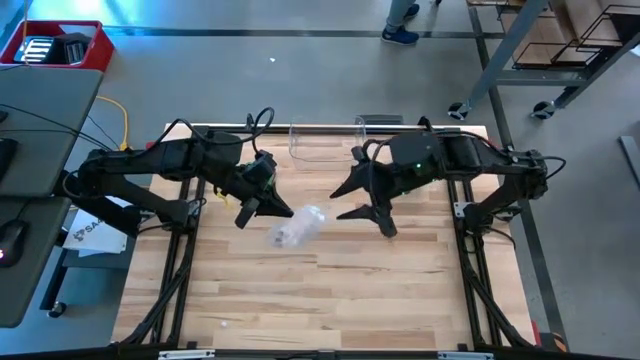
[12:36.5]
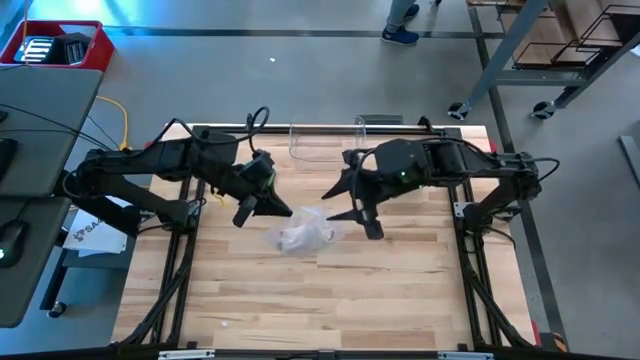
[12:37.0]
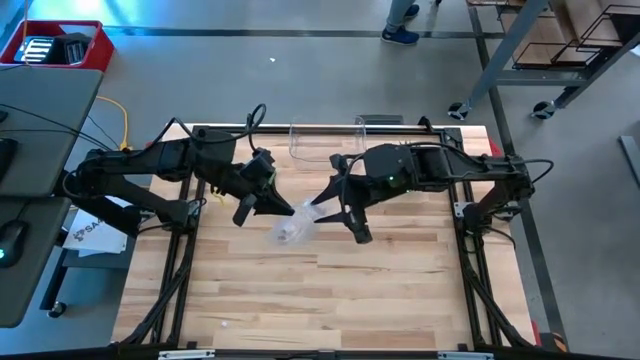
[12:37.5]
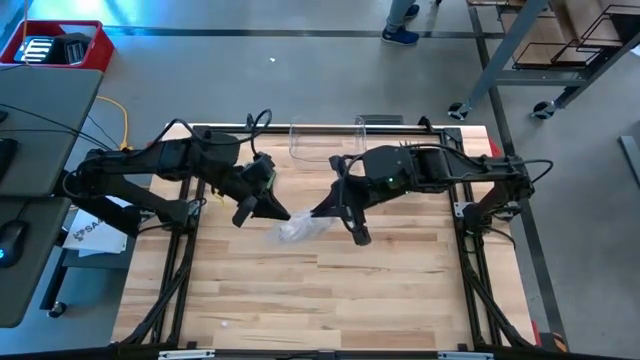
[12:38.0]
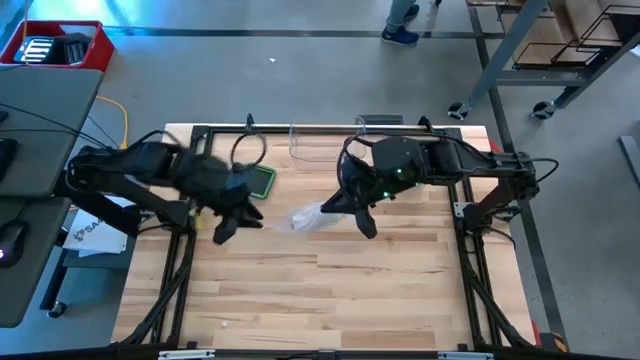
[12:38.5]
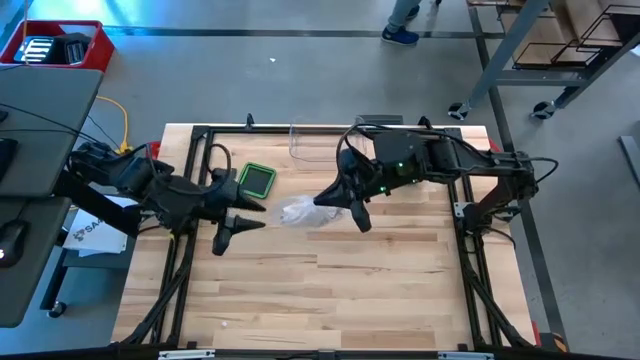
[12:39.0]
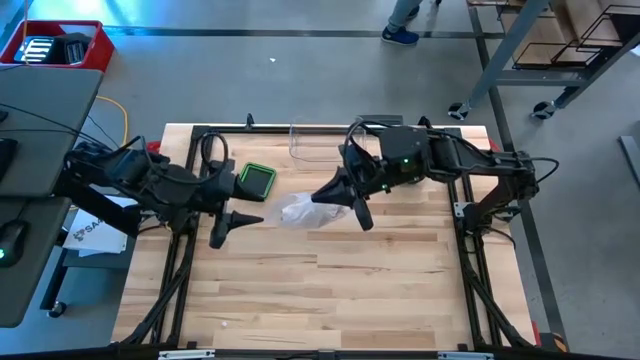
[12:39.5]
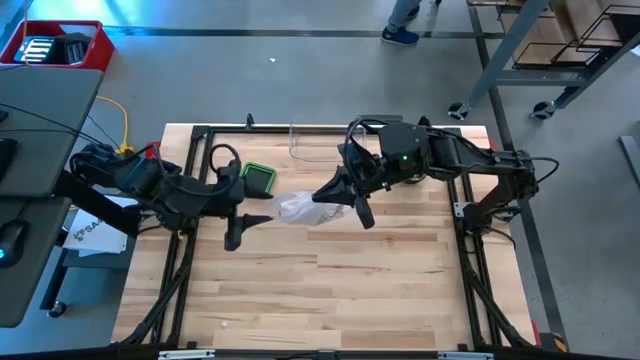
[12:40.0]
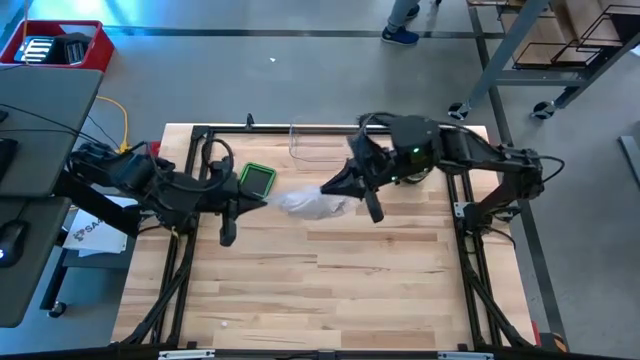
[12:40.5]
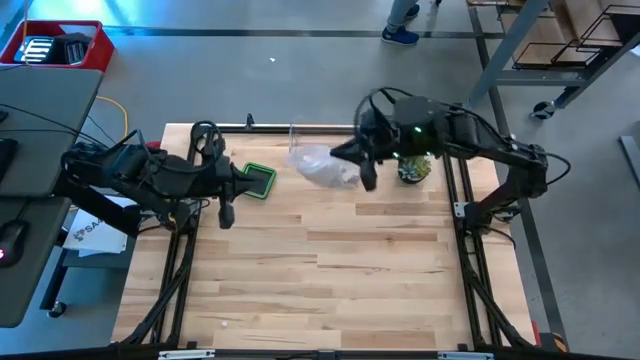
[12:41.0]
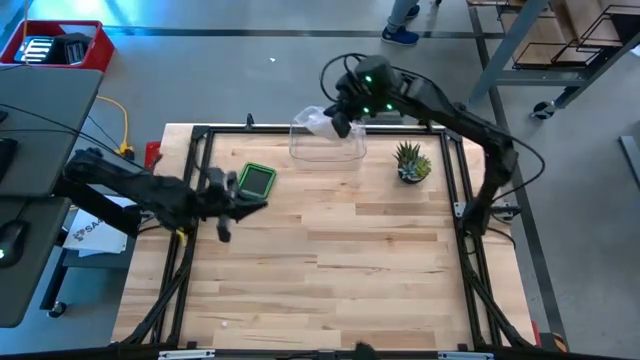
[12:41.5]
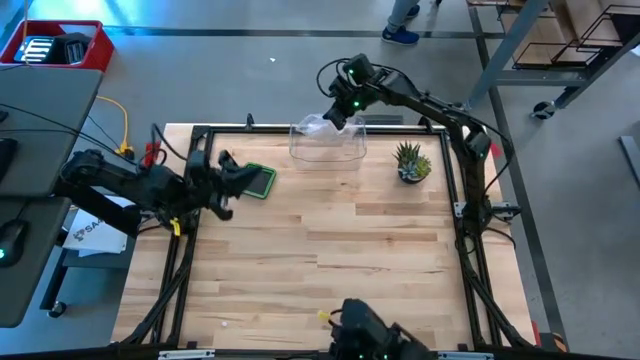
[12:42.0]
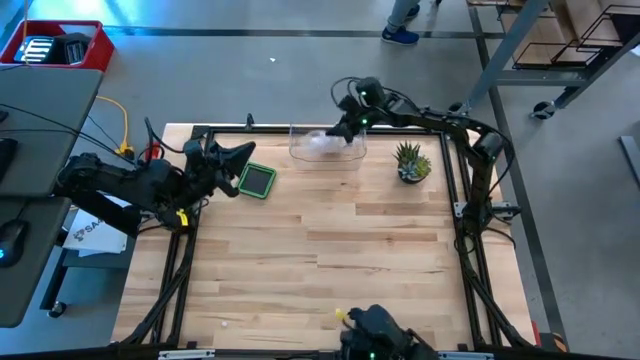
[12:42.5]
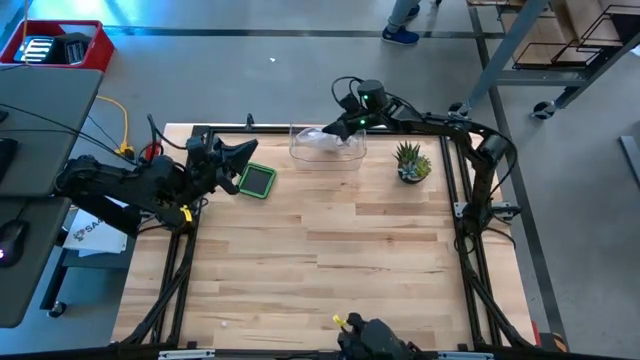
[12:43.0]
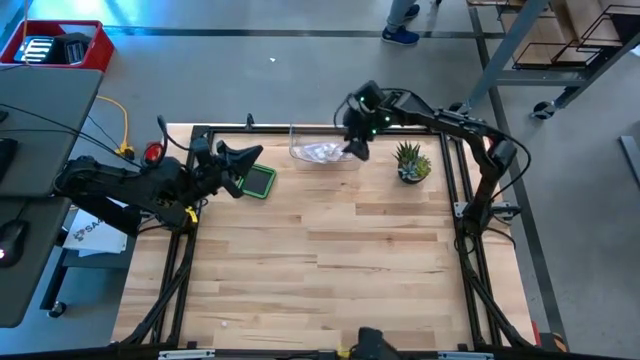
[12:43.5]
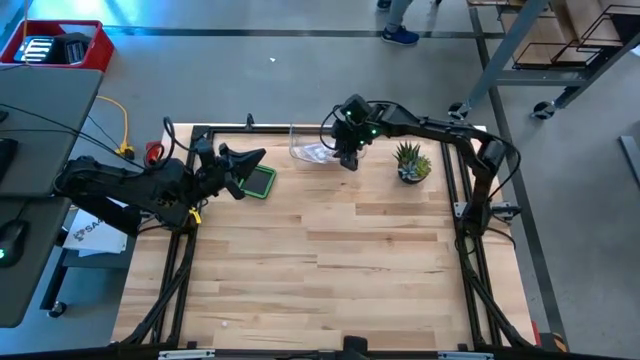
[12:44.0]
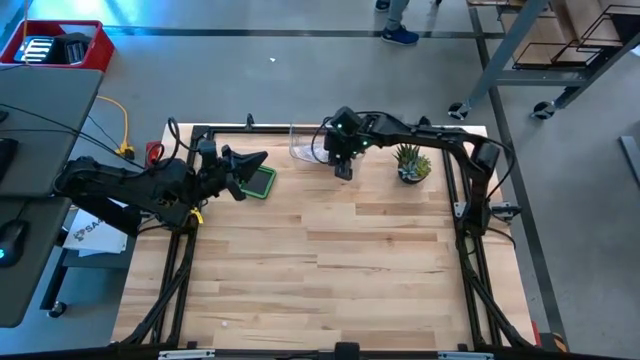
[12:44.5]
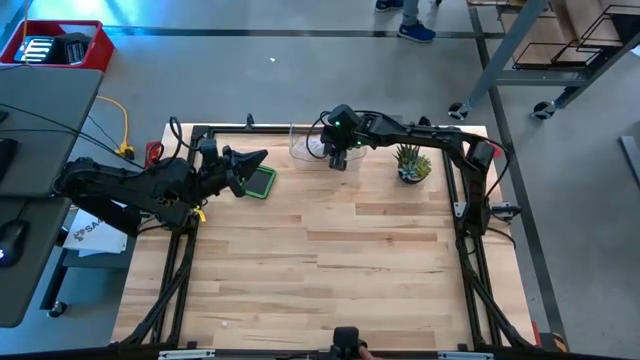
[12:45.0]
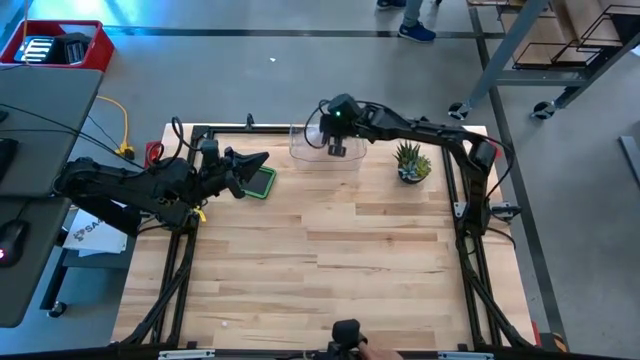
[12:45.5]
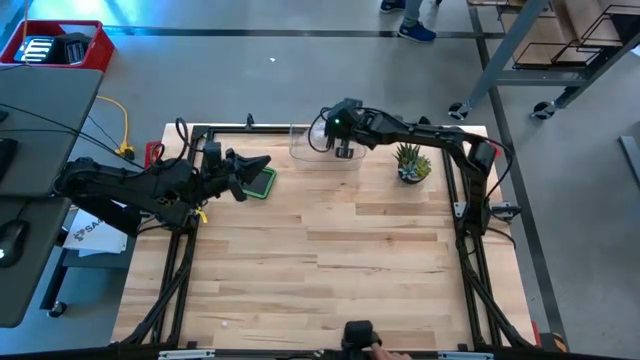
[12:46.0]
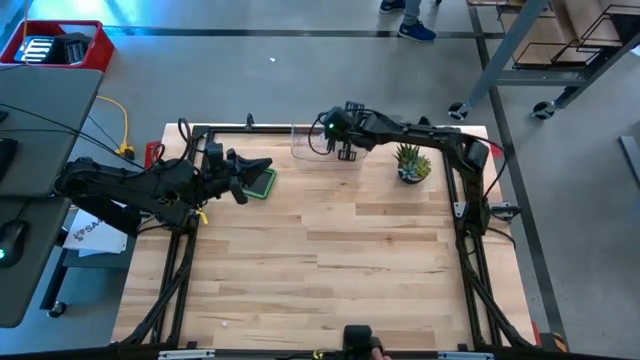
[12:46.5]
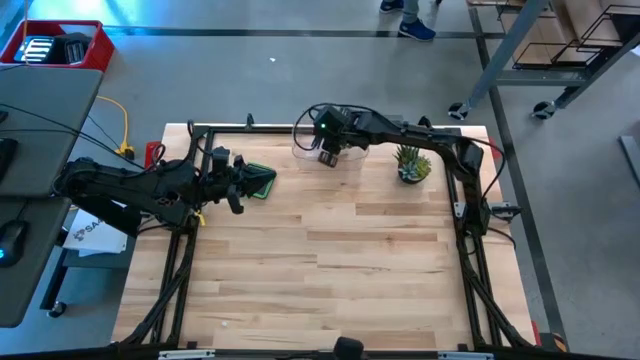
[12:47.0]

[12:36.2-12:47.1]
Task: Roll bandage
Put the bagged bandage into the transparent bin

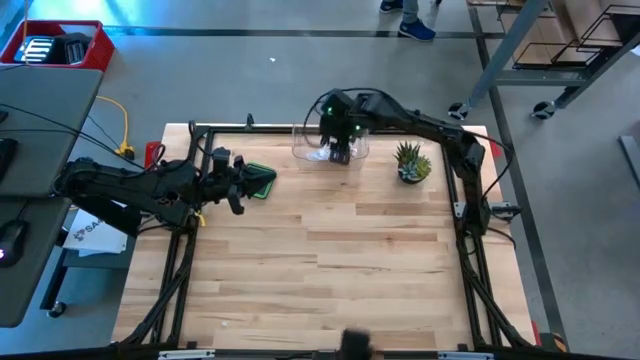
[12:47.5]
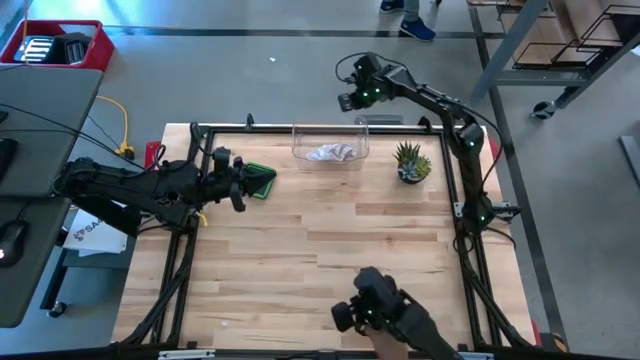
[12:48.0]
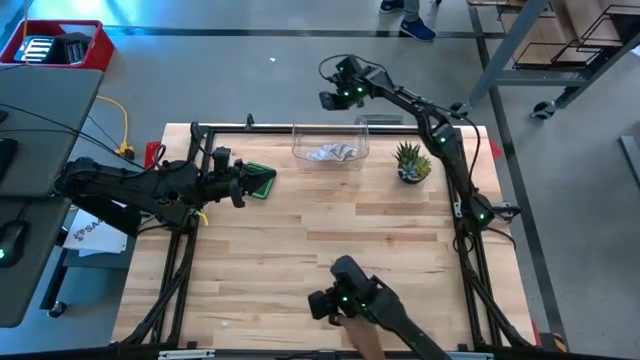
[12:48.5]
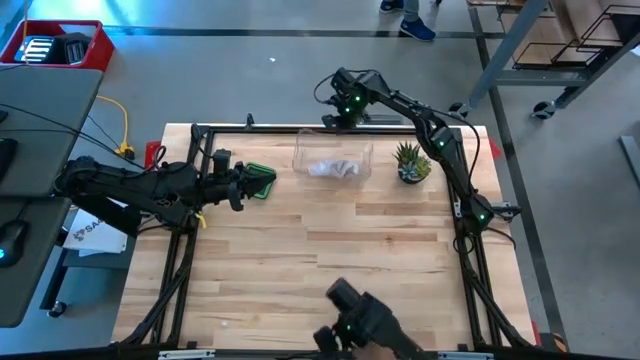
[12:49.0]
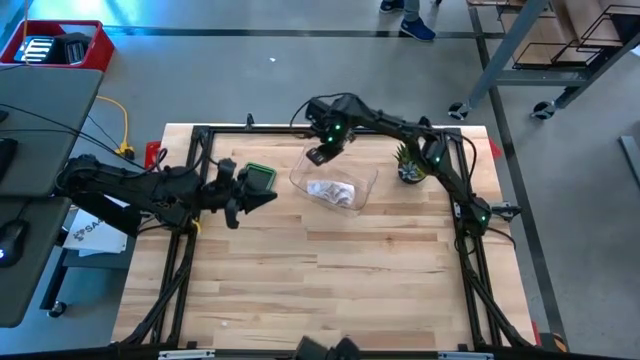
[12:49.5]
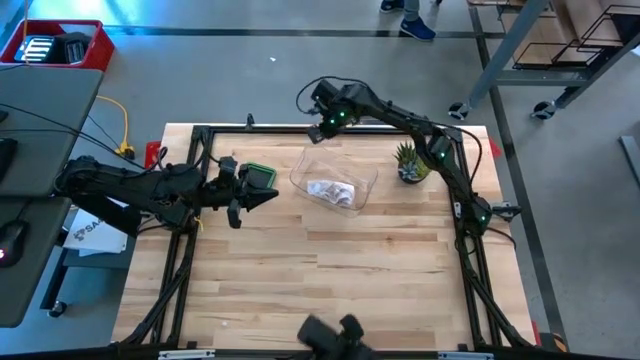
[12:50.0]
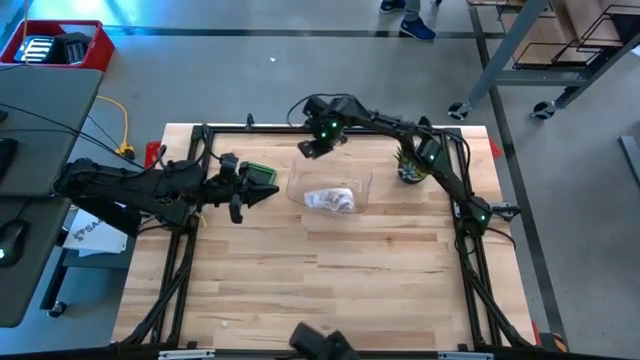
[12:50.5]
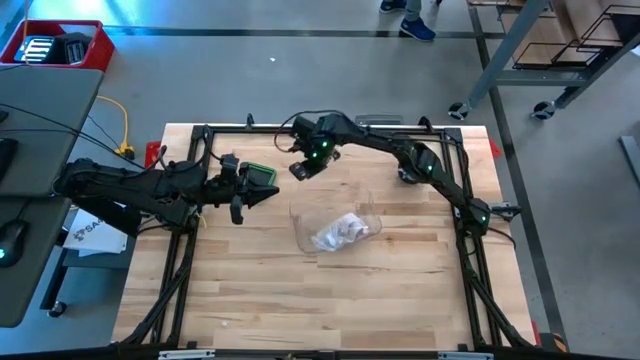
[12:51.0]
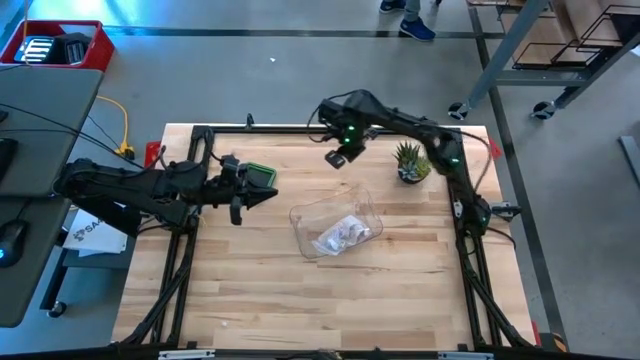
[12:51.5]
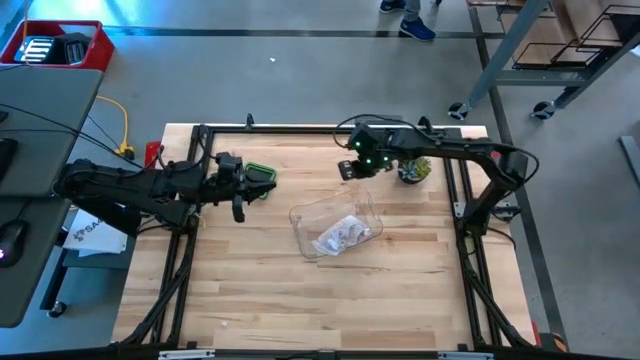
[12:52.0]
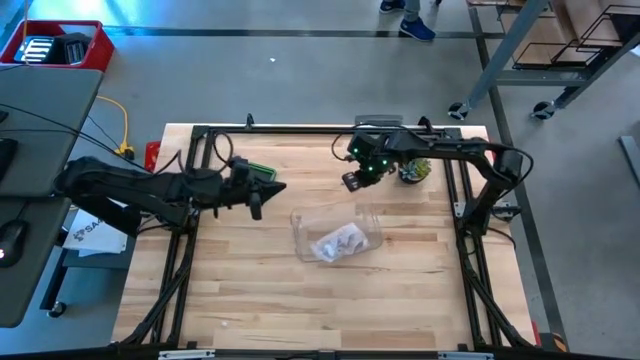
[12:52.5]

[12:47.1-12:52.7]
Move the transparent bin to the center of the table

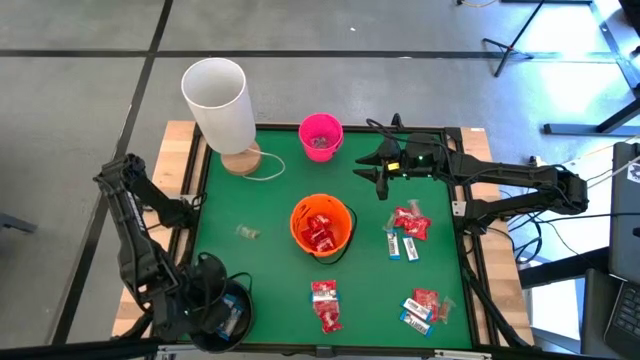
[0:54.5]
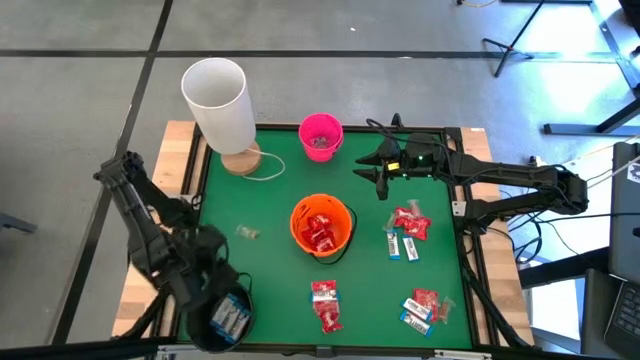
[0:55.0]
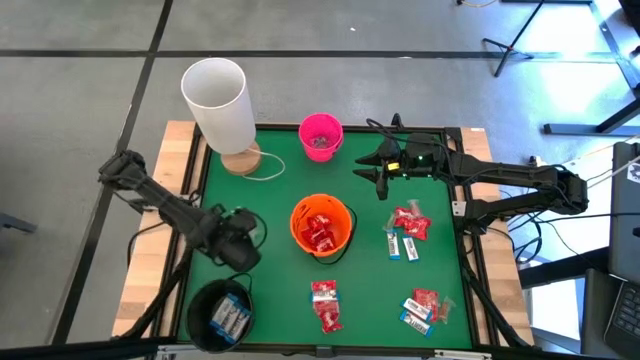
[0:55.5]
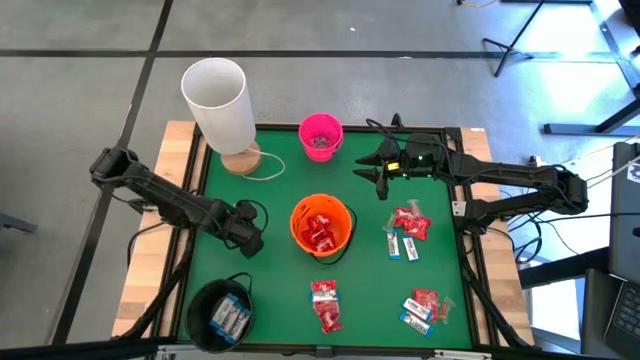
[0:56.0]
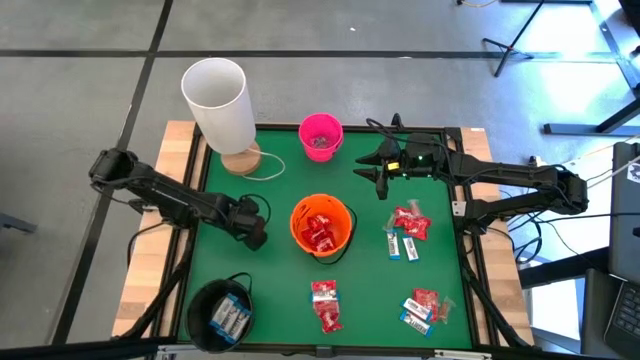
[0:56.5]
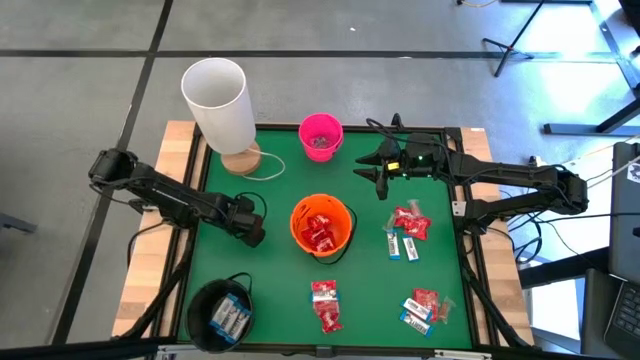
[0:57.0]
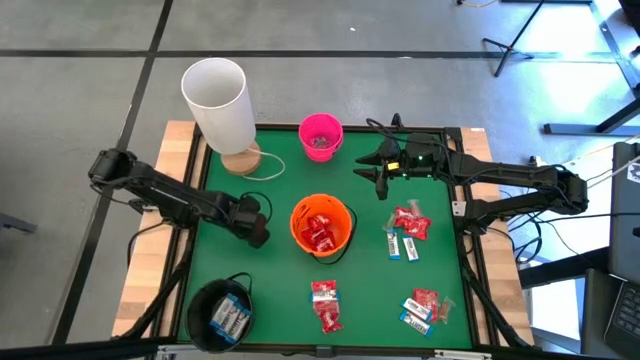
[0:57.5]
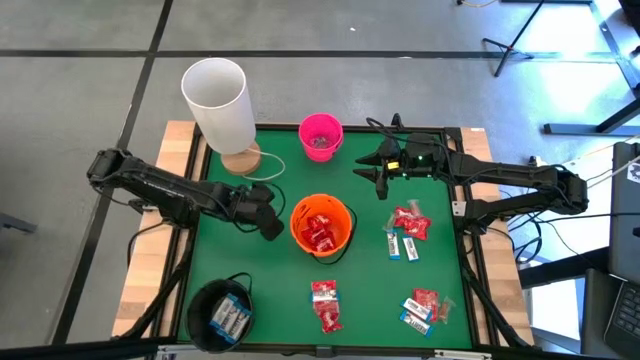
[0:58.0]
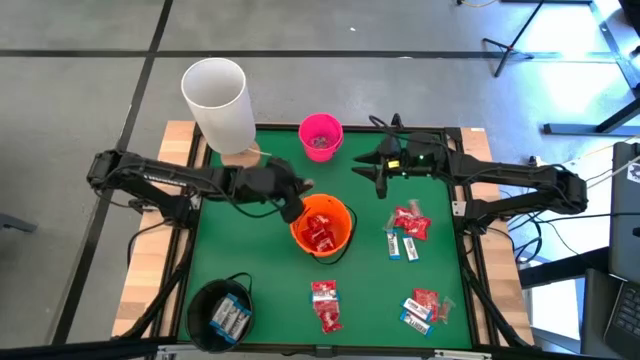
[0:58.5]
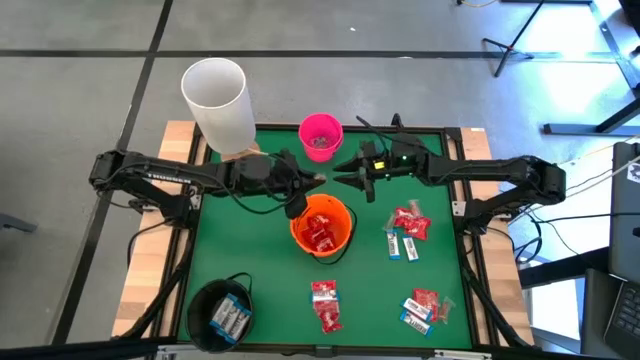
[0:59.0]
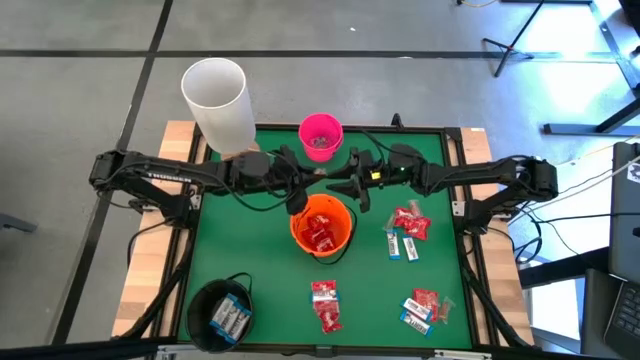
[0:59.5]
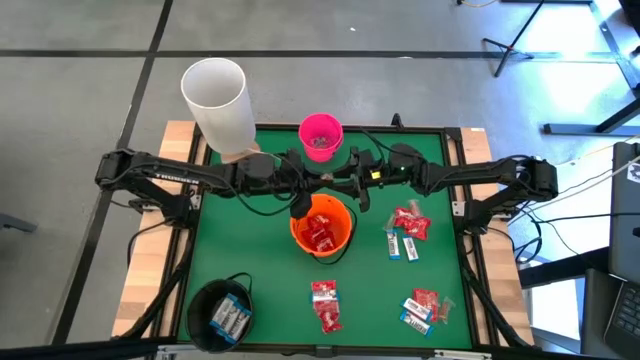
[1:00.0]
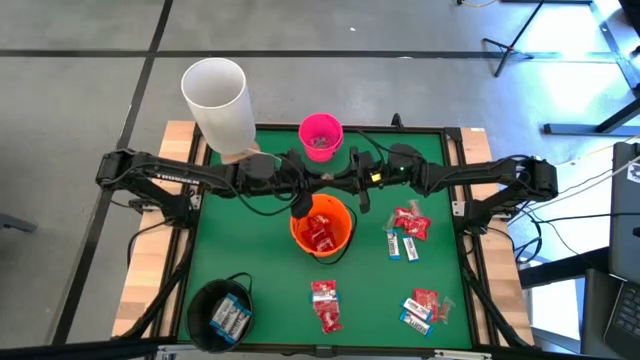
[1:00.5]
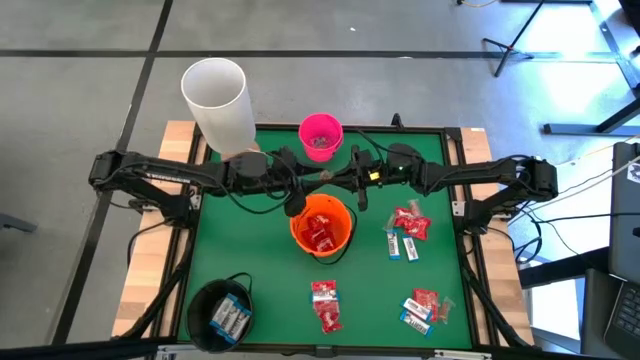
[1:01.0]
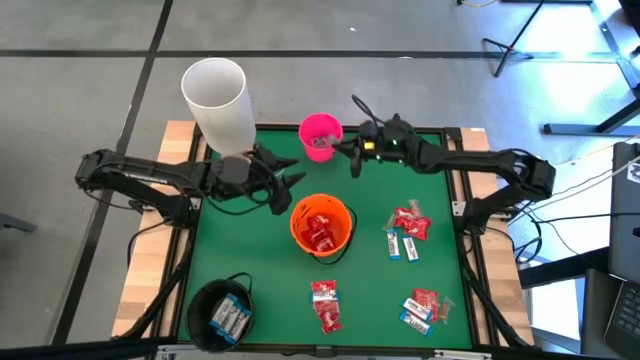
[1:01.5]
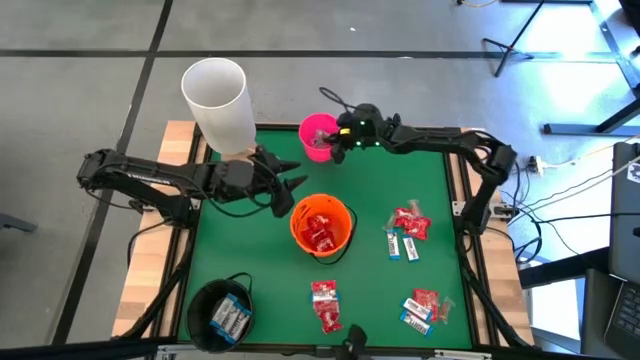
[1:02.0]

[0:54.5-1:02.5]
Task: Sort candy
Put the green gummy into the pink bucket
